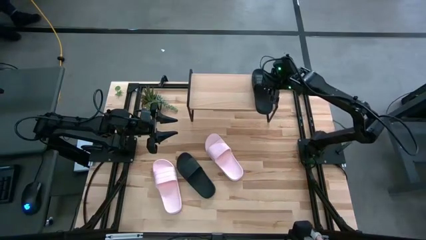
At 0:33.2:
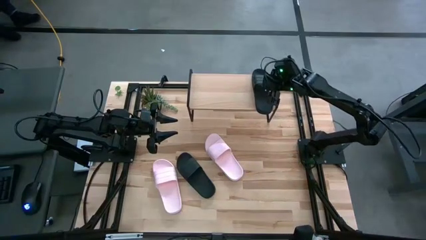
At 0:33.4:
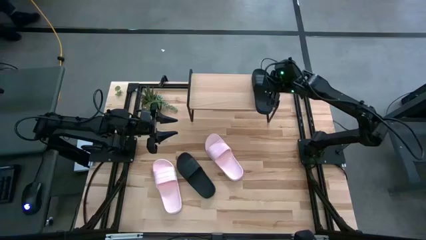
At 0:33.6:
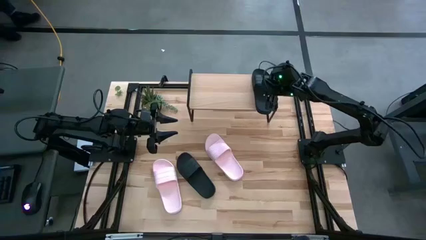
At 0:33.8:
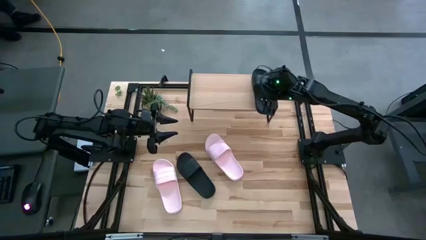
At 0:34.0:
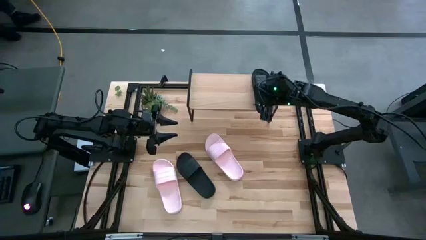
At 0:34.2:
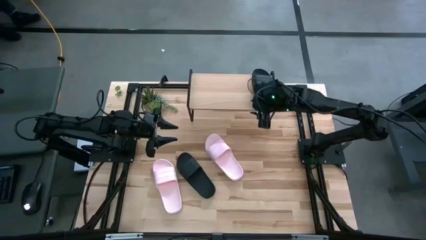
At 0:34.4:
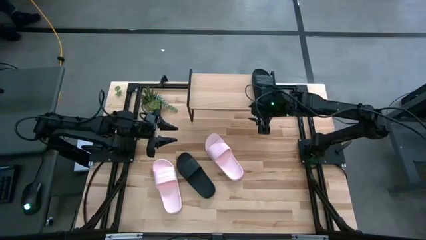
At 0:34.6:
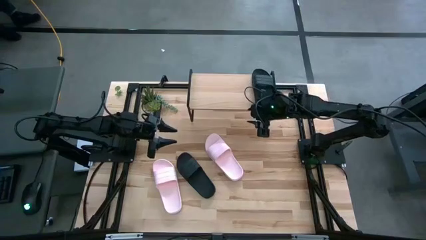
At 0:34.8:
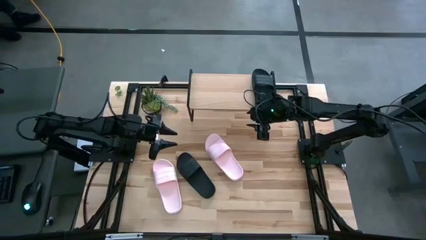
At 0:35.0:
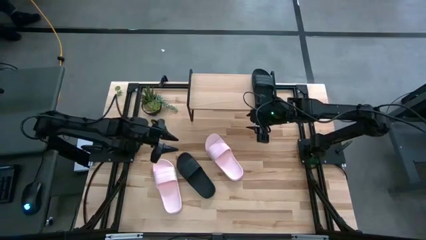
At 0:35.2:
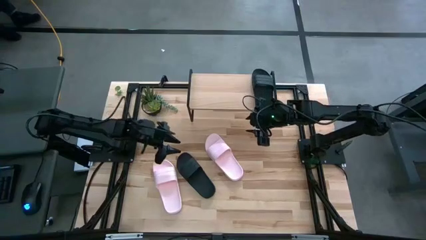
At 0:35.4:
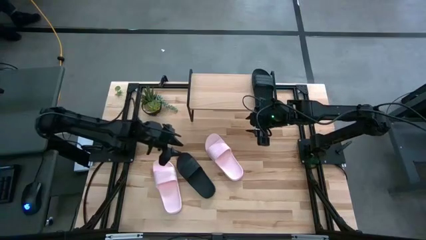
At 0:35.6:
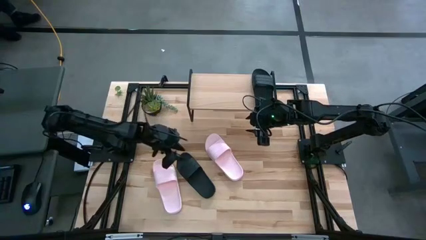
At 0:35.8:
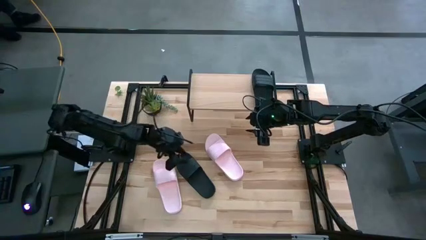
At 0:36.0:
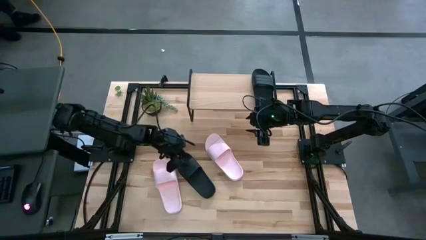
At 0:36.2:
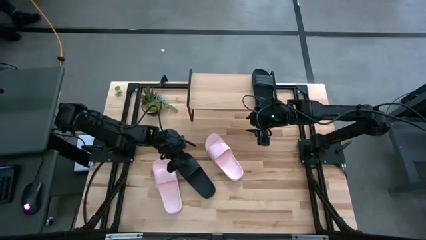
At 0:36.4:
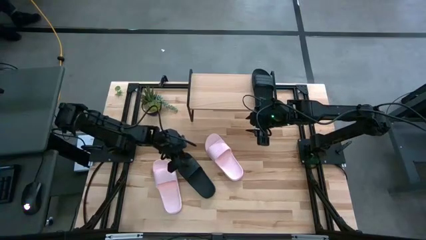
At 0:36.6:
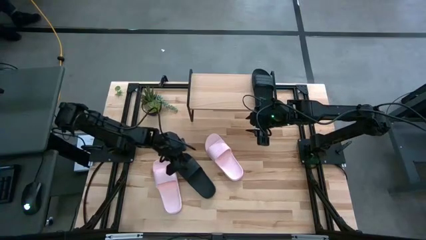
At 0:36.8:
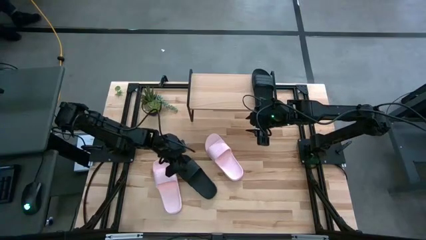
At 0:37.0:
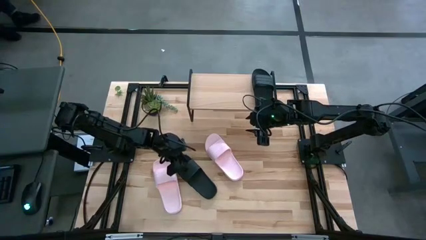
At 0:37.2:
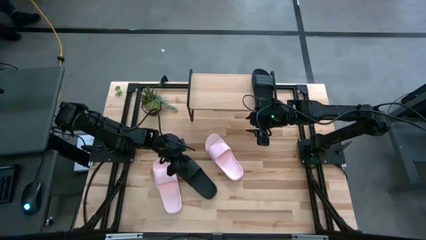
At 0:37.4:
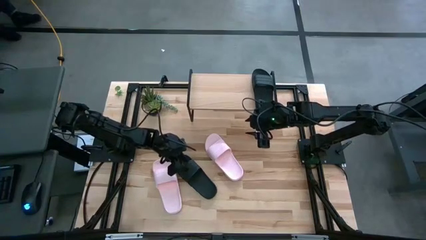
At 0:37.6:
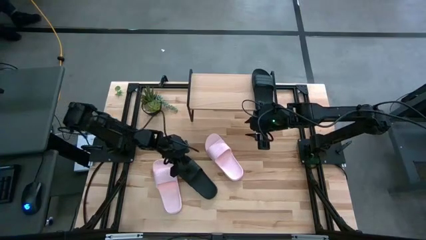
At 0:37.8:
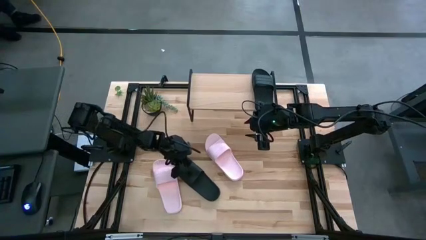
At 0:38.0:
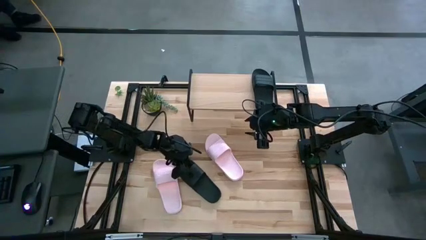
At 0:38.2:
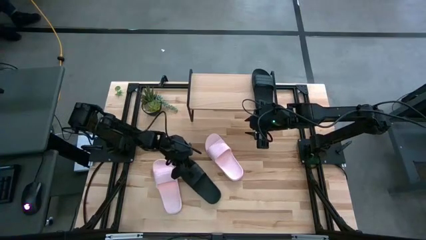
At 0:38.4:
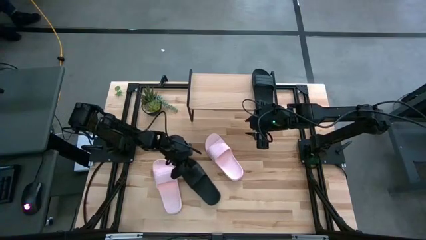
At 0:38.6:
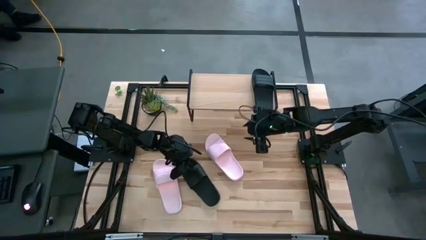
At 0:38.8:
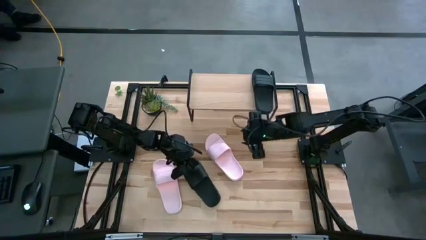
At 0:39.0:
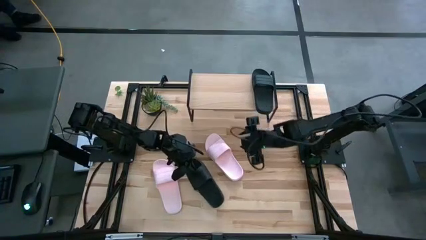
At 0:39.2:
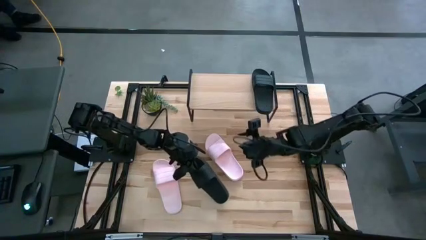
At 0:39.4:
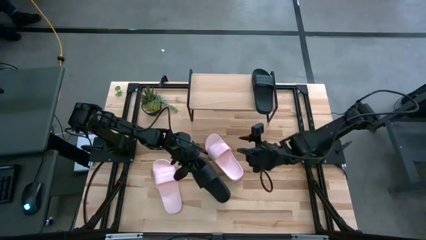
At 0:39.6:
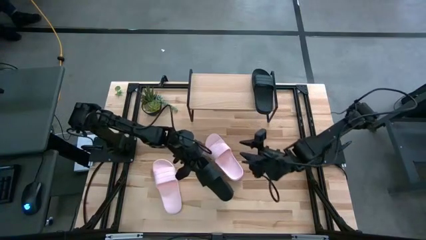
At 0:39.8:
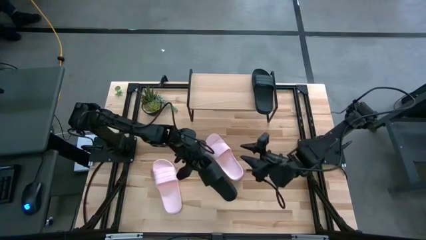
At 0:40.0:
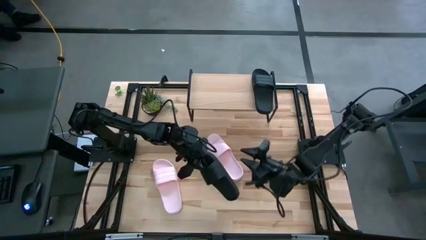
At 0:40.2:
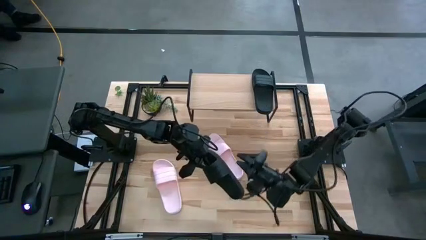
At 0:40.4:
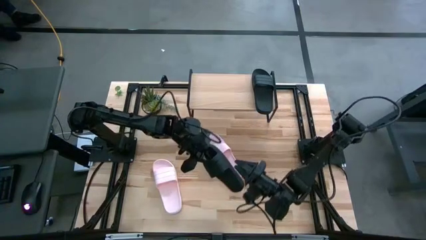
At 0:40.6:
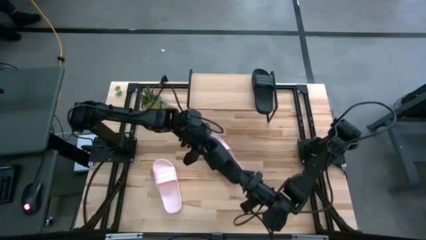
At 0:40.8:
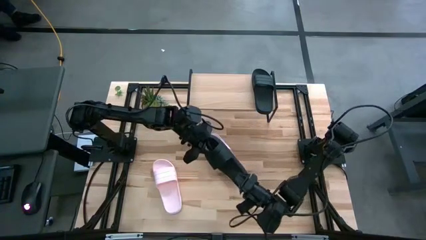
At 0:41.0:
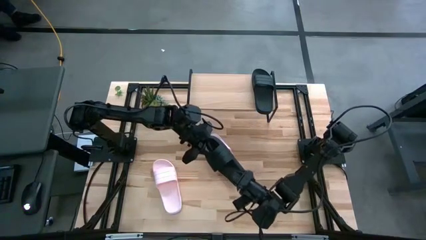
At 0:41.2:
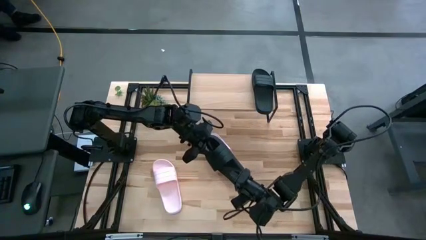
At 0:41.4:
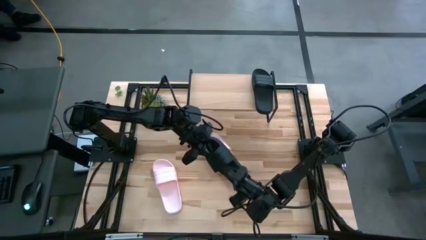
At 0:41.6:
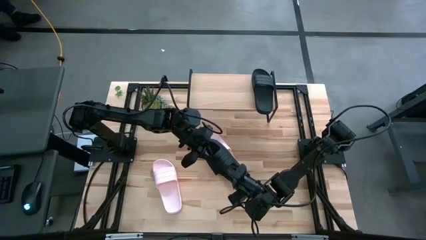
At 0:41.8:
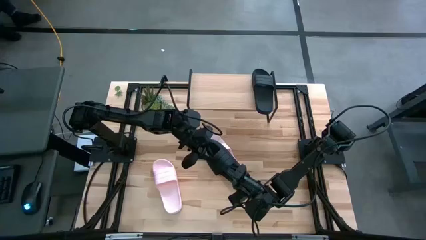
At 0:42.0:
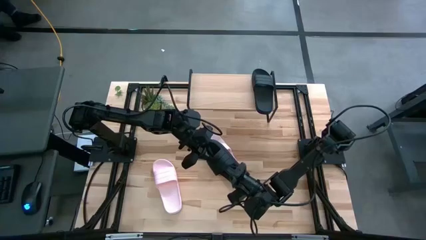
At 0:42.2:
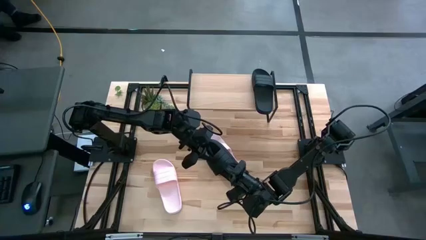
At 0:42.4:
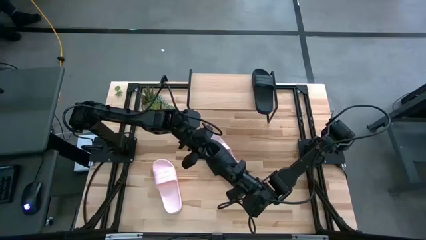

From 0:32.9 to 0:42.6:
Task: Pick and place slides into the shelf
Put the black slipper on the shelf

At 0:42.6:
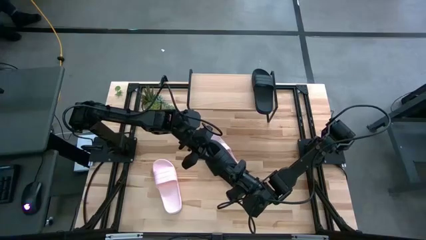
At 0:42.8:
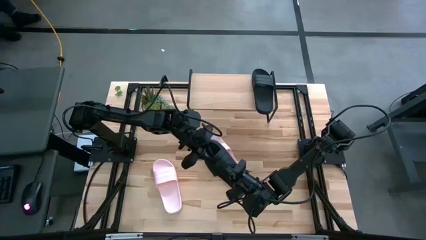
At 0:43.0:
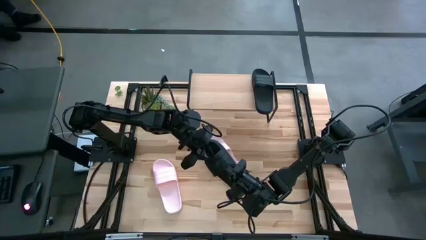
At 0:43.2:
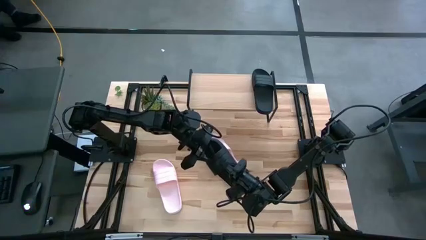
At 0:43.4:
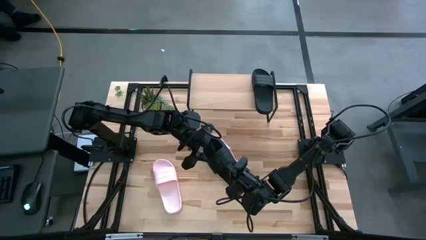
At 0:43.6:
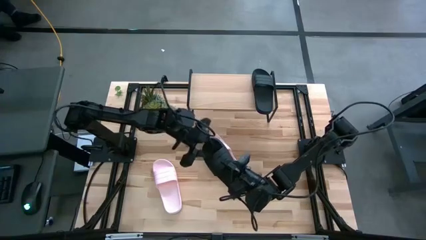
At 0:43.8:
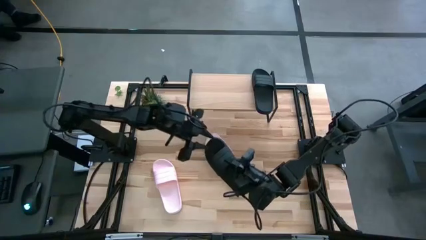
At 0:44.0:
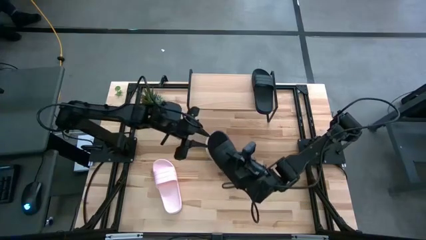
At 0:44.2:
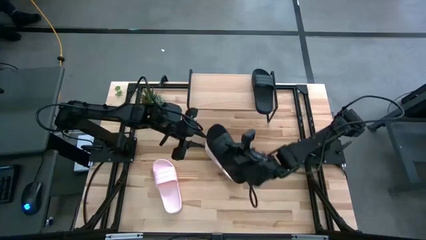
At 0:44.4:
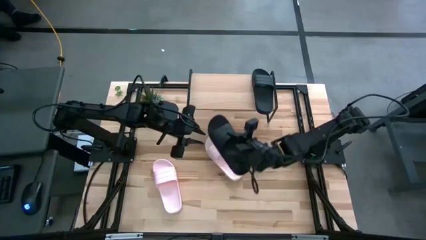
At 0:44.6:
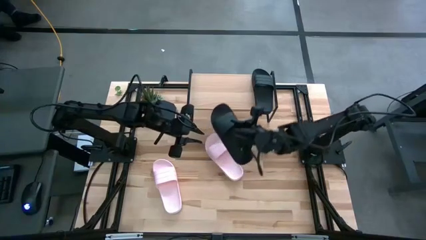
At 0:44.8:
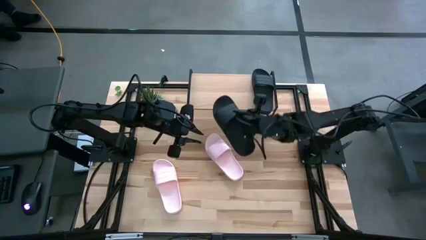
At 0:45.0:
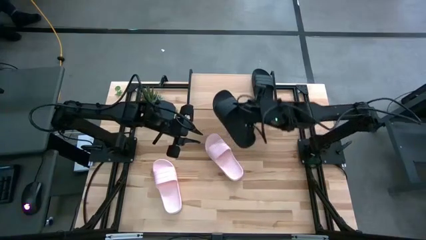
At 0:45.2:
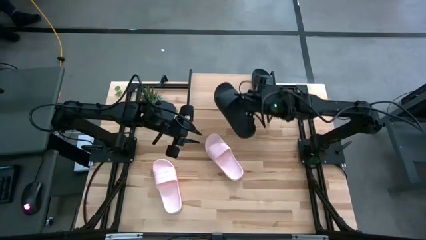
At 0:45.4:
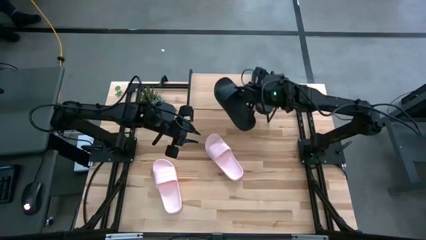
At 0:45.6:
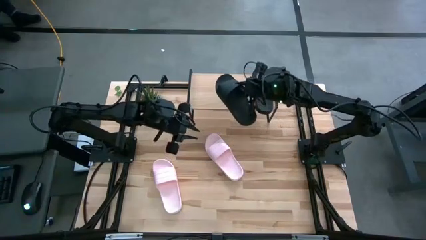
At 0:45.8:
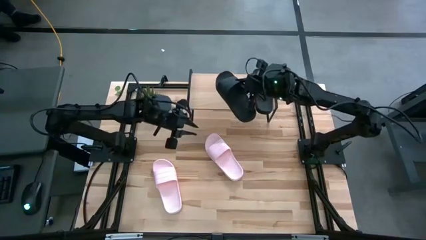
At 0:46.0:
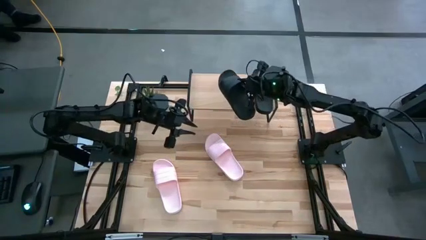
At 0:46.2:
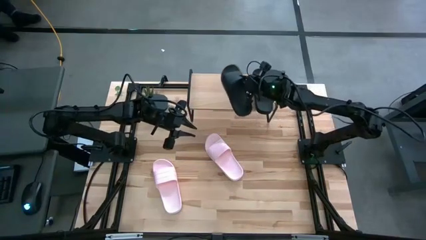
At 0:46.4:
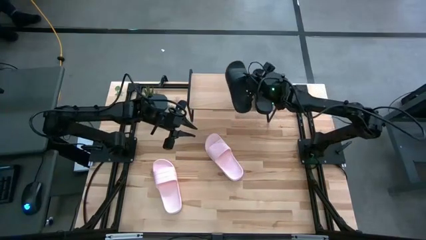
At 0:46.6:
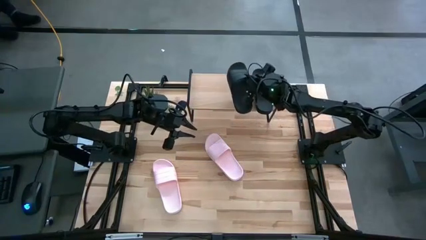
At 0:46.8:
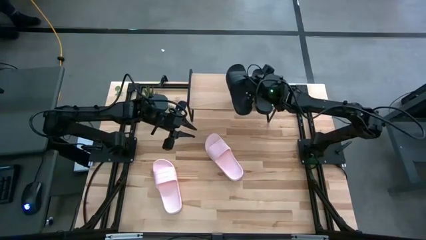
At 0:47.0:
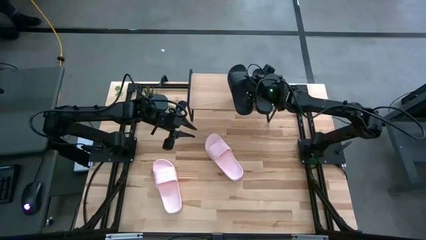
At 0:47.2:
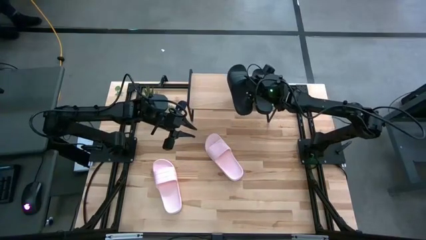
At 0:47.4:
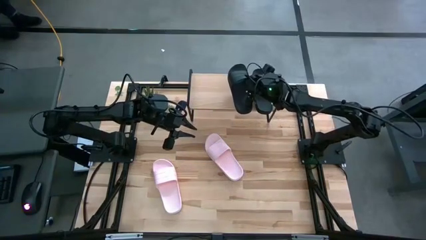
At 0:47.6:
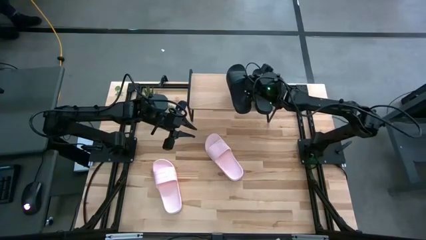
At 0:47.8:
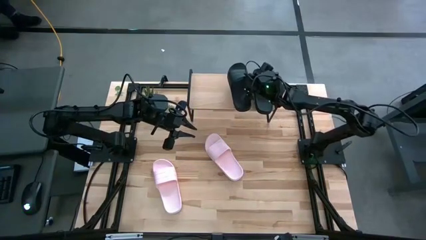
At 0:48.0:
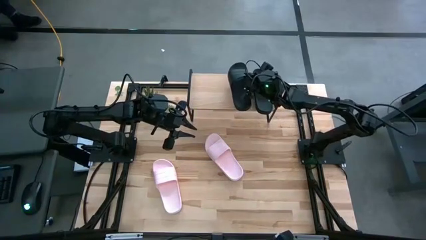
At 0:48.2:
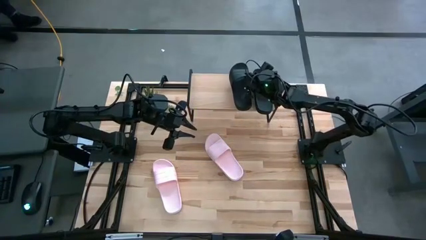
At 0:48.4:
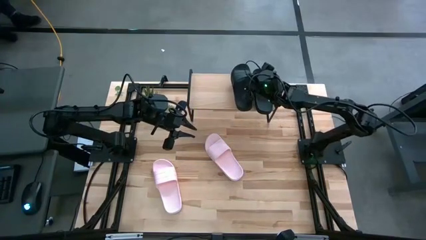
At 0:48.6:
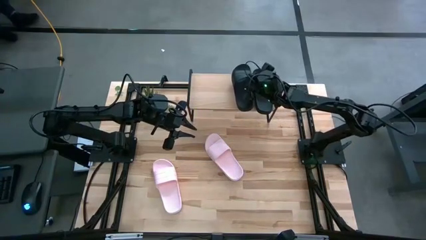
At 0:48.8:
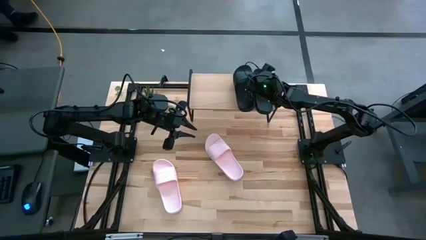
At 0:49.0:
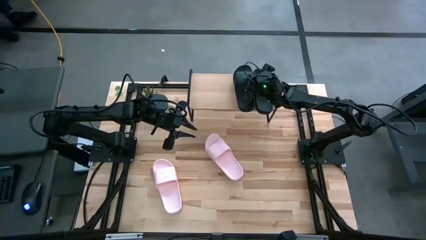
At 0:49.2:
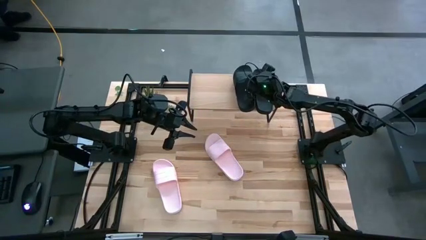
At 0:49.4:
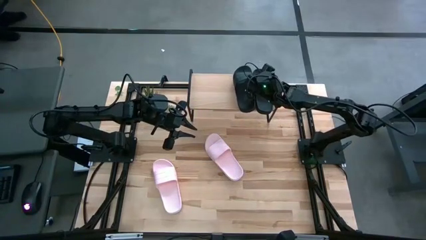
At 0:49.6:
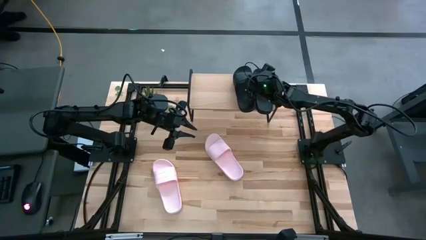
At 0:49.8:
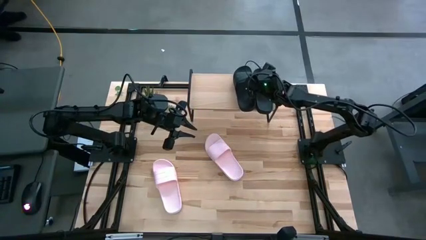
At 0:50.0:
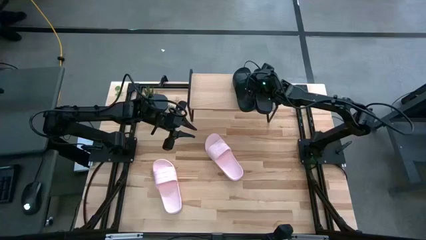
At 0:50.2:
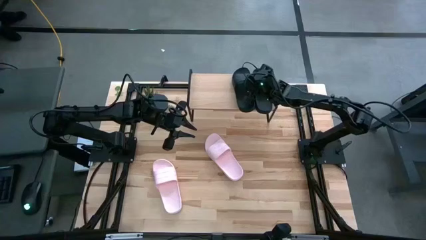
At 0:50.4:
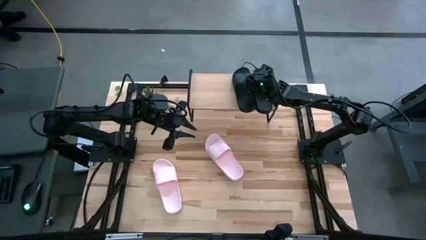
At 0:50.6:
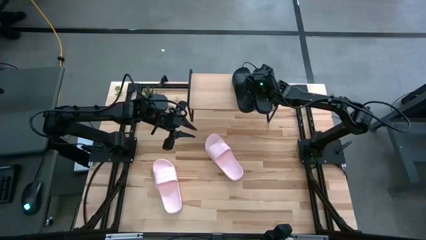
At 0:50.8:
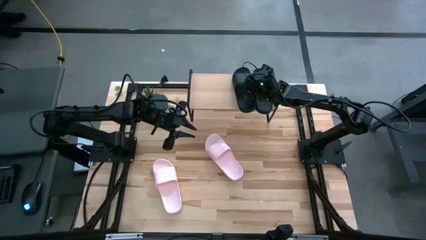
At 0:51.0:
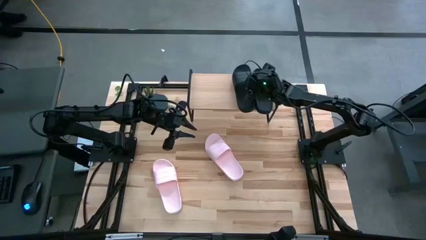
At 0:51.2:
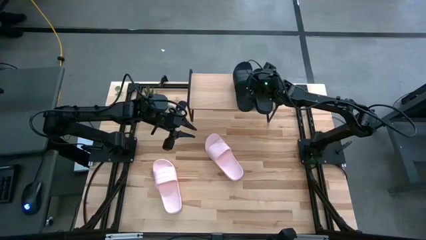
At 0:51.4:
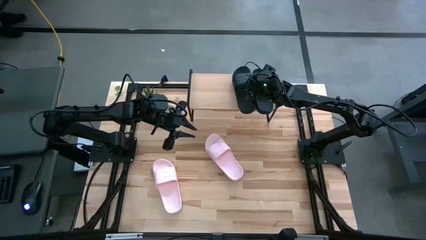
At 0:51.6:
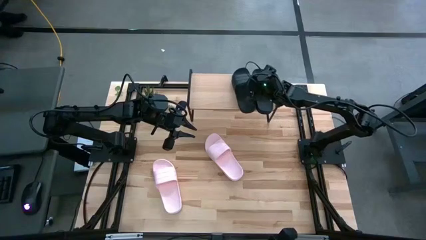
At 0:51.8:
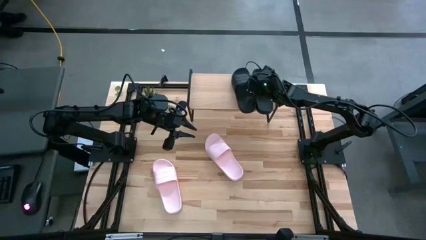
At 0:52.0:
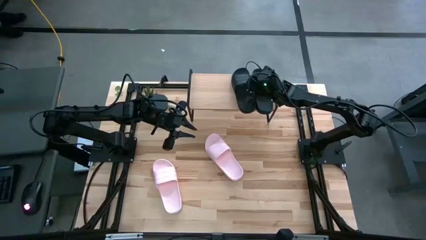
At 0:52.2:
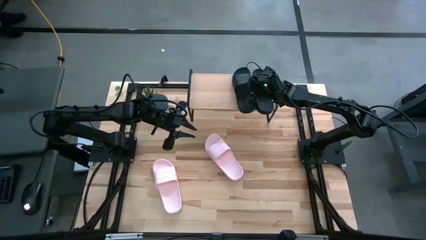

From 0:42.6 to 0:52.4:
Put the black slipper on the shelf
